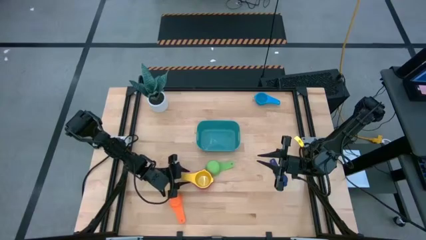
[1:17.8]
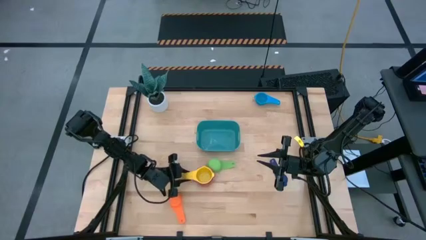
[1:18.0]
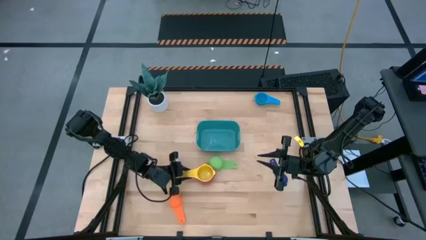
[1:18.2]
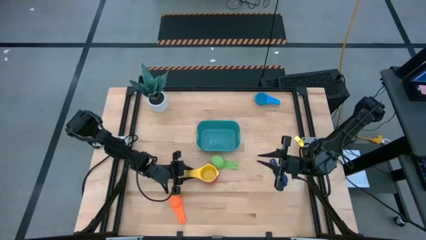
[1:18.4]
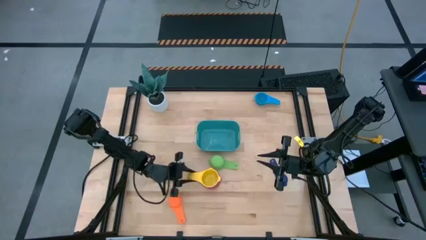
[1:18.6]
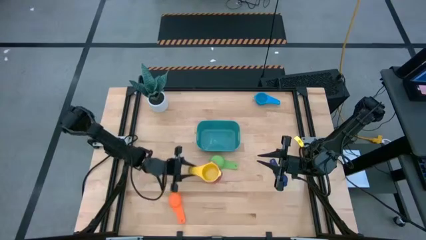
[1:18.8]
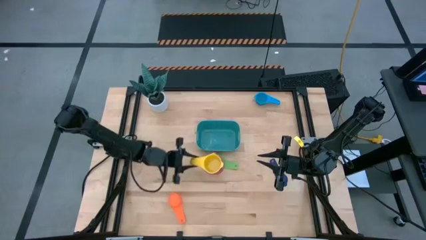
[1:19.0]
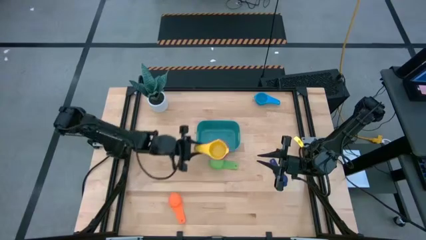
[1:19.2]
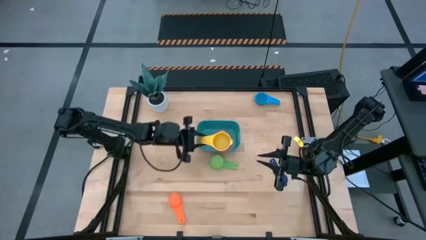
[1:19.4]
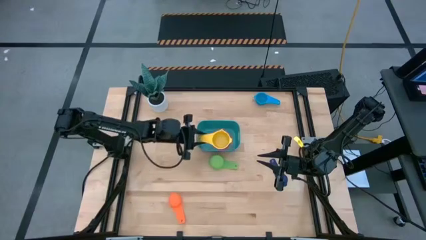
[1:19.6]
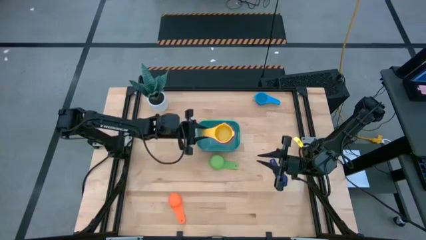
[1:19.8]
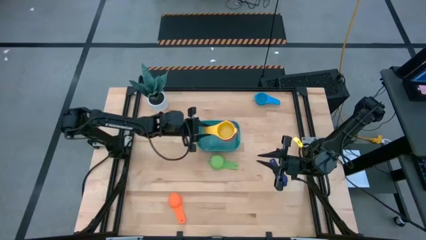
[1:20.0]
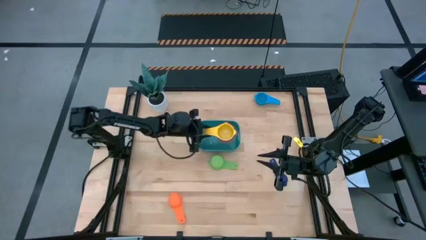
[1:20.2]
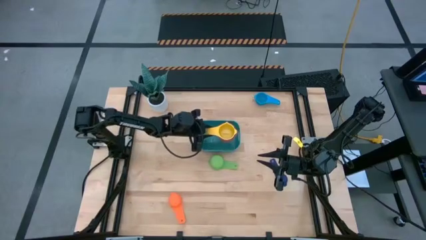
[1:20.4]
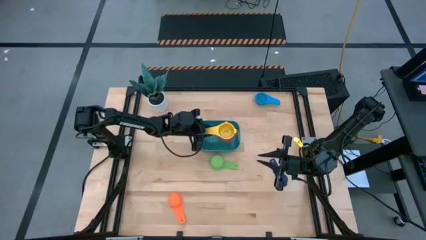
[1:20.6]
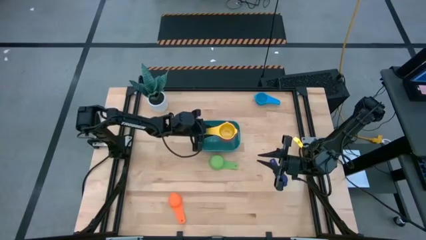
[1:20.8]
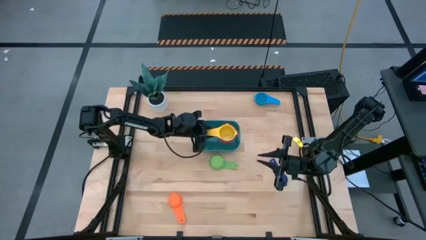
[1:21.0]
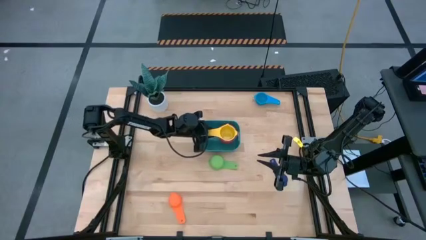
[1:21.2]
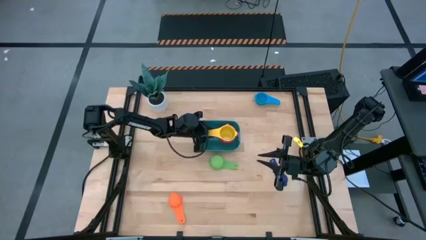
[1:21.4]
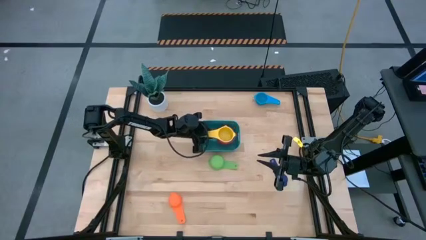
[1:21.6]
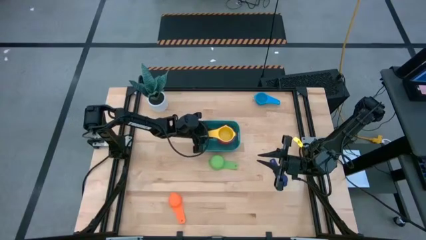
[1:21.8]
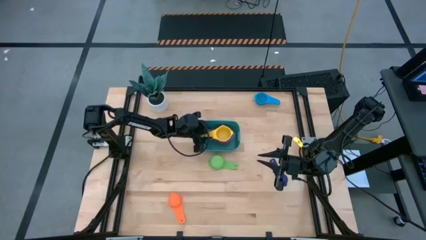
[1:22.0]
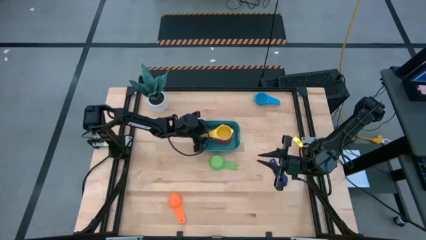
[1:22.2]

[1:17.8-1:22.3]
Task: Nest measuring cups in basket
Put the stack of measuring cups into the light blue bin

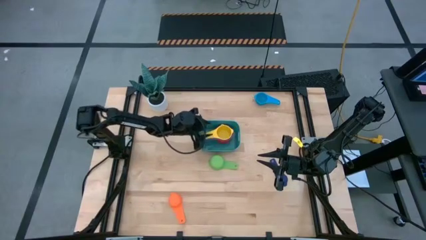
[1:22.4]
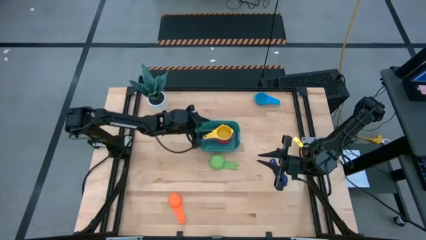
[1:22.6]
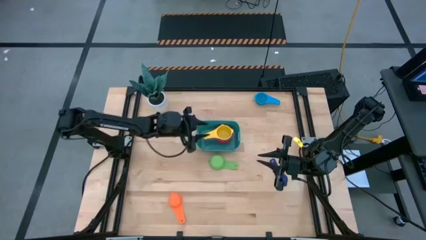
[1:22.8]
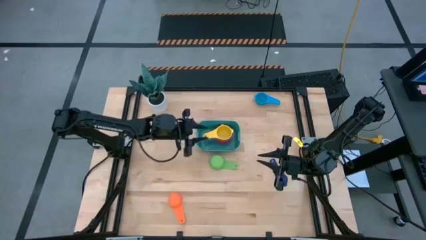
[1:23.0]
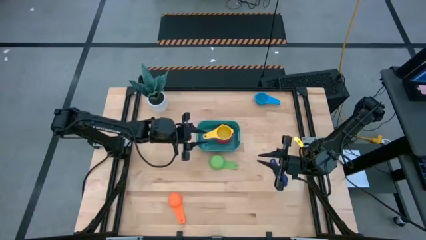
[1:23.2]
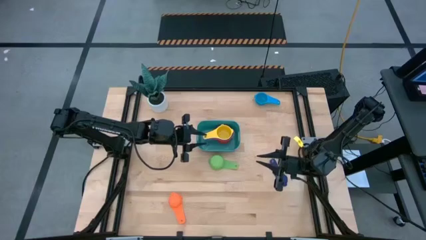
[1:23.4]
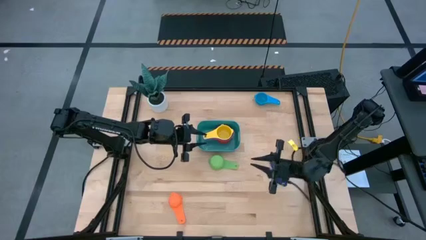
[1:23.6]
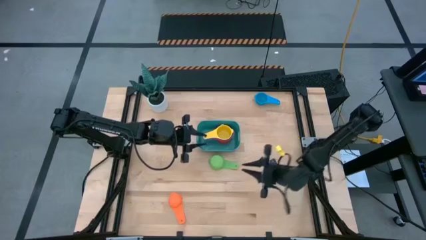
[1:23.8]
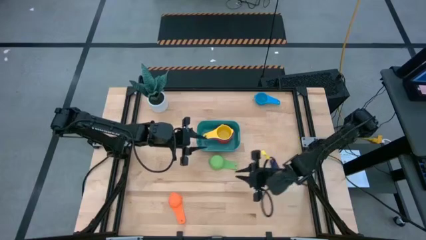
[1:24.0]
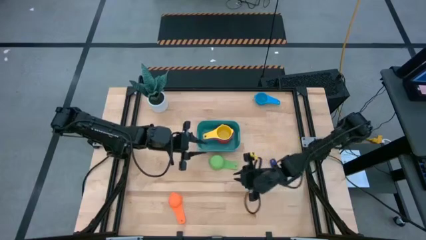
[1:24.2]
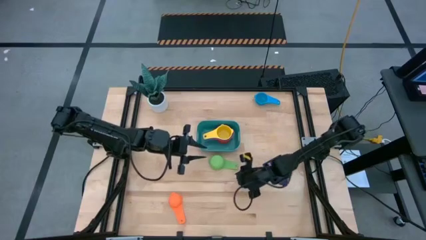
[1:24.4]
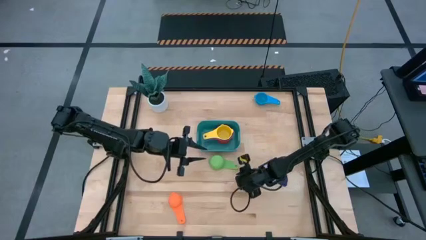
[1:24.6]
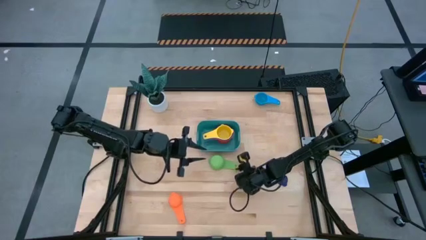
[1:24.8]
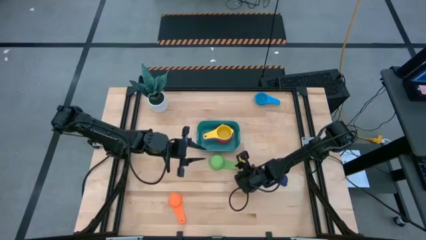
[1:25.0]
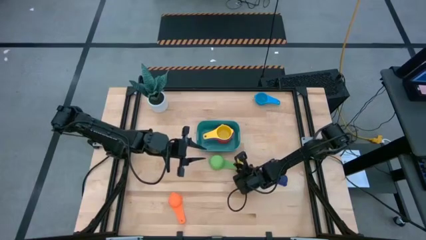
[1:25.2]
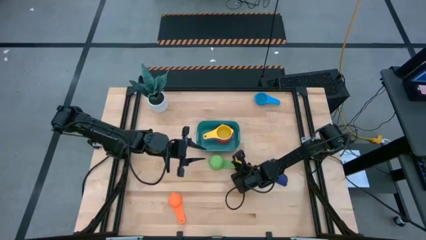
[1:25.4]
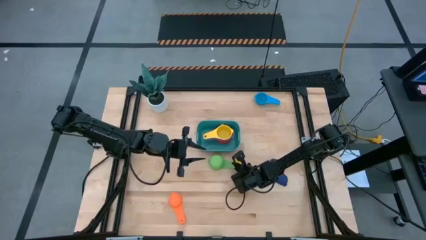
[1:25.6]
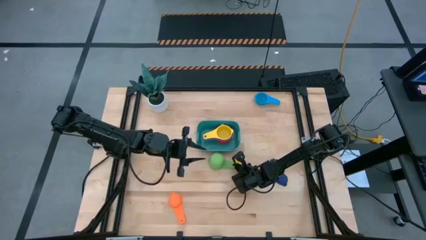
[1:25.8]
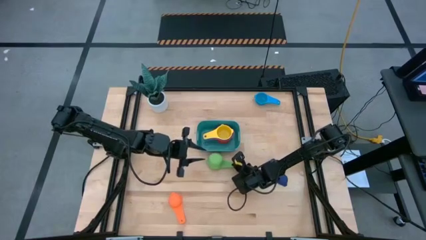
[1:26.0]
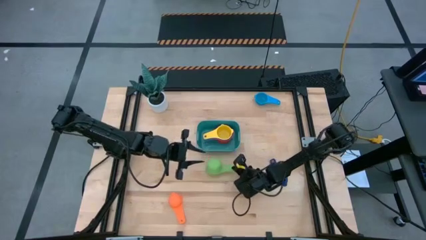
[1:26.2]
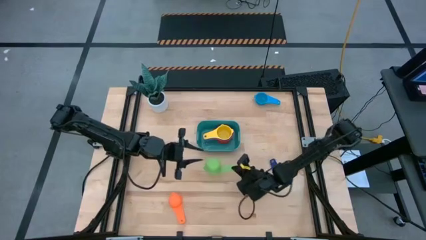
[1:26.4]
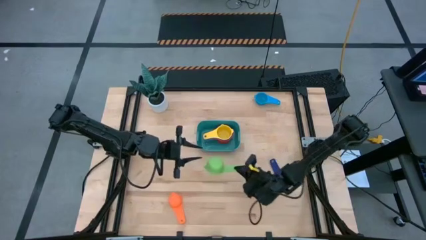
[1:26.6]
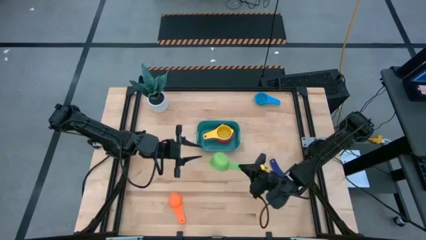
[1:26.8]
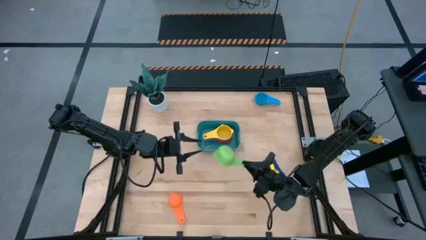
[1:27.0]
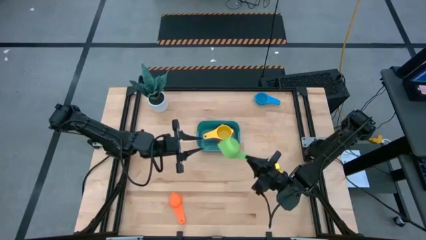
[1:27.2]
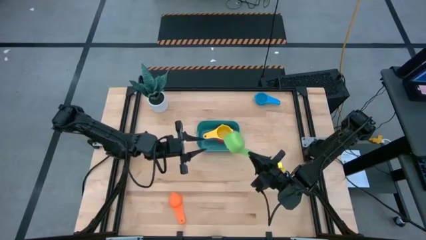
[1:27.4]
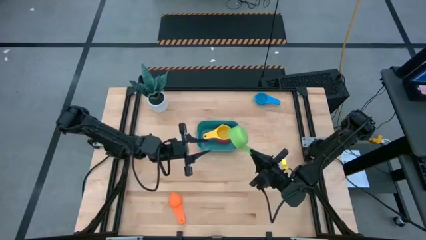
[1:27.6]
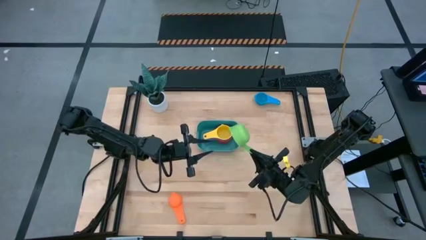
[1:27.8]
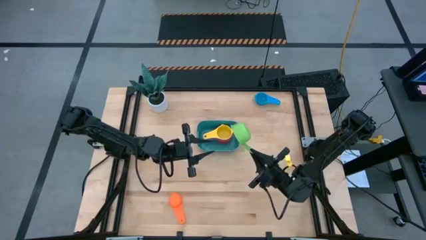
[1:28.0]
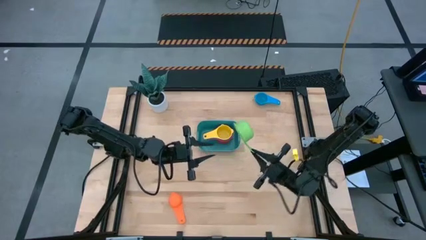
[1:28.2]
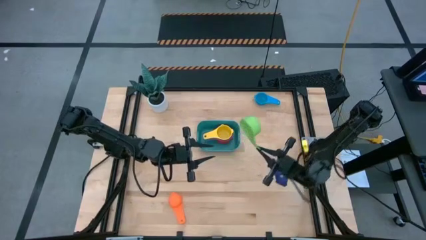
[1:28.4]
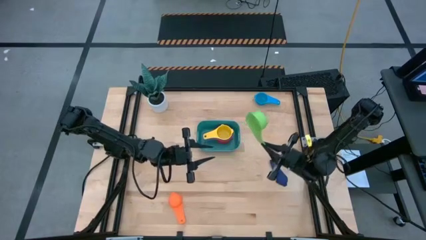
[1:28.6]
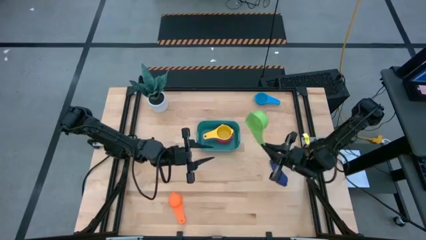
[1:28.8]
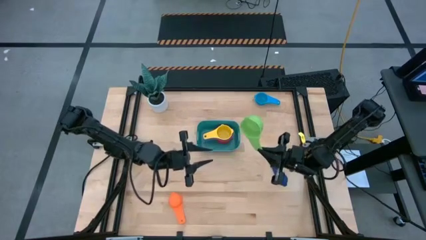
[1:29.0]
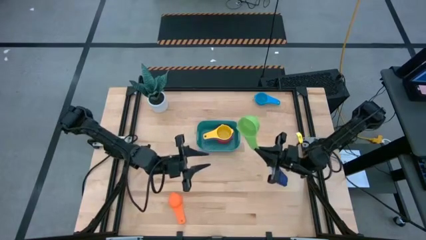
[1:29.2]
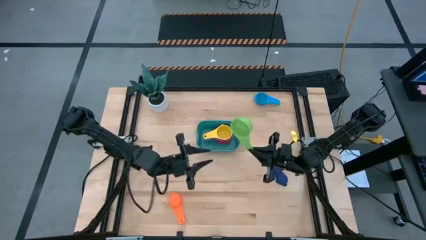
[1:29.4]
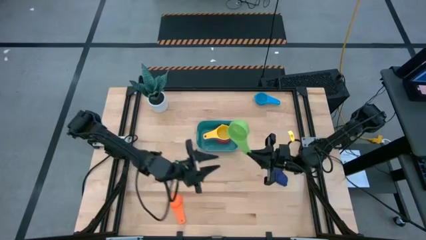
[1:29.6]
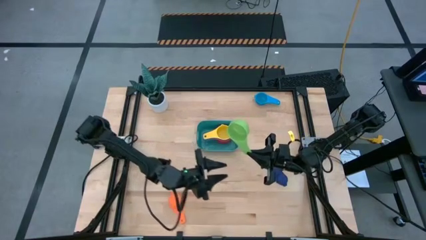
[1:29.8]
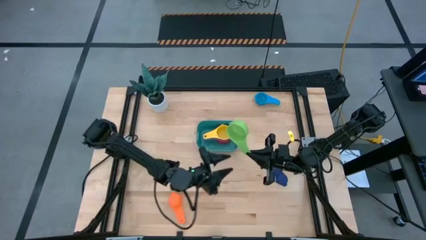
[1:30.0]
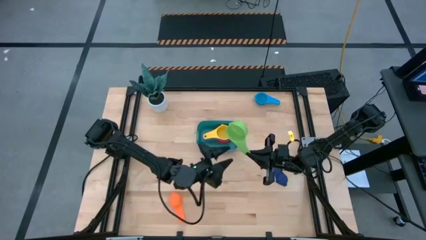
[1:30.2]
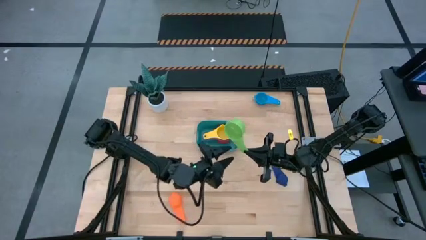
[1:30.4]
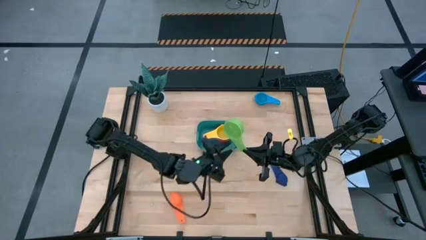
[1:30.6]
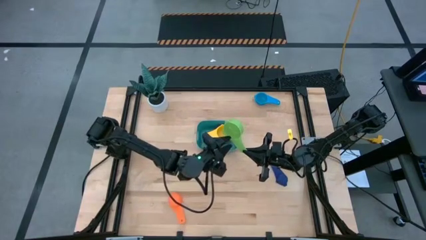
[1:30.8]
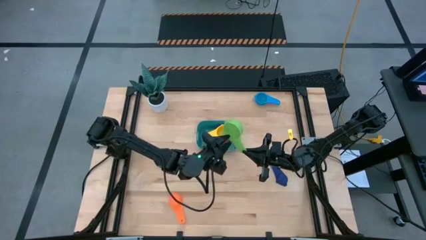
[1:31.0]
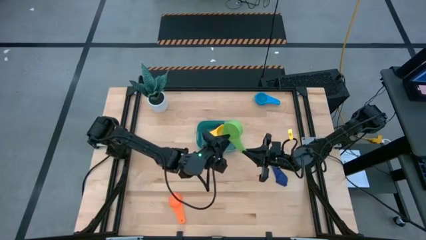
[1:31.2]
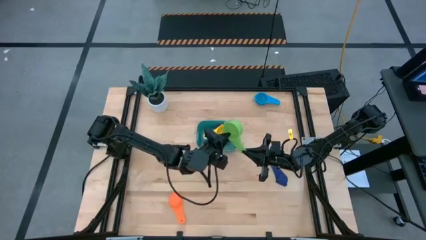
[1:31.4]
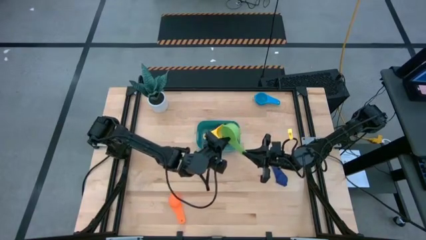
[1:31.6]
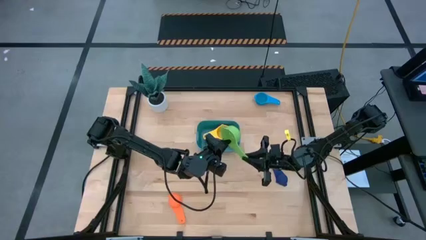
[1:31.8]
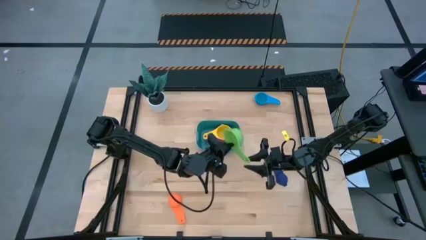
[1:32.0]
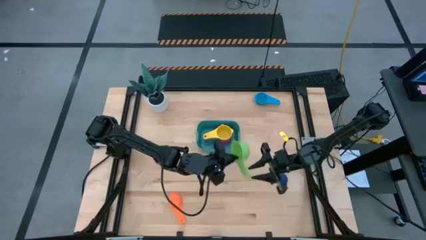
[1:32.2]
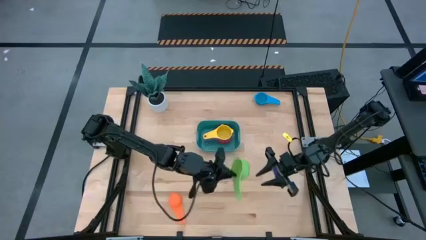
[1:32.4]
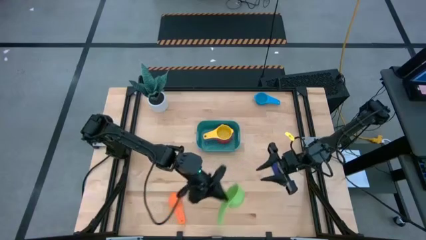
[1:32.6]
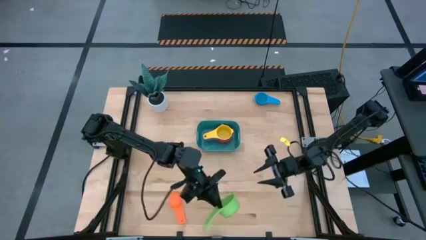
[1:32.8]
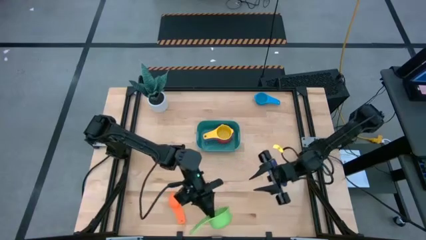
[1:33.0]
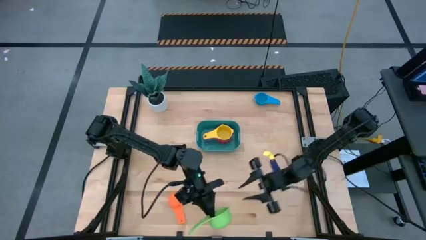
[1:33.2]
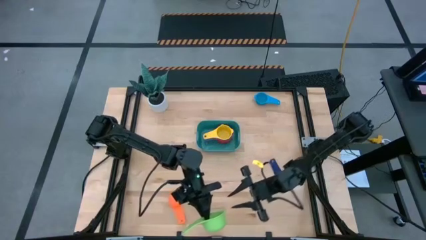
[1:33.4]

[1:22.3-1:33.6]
Stack the green measuring cup on top of the yellow measuring cup inside the light blue bin
